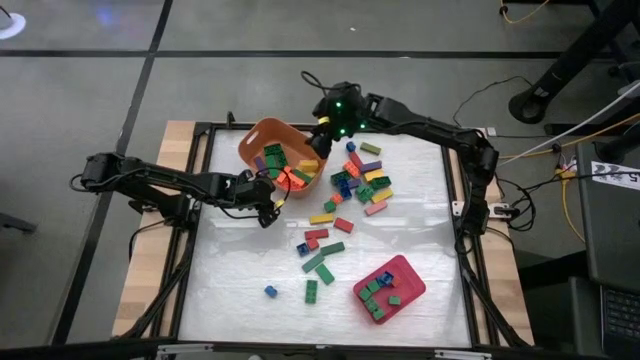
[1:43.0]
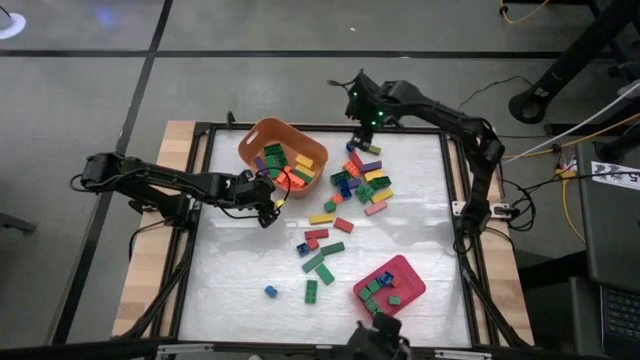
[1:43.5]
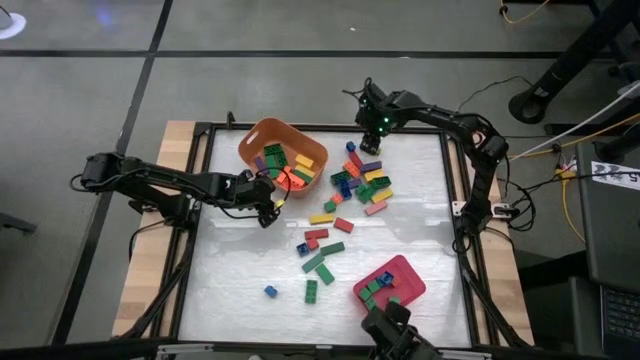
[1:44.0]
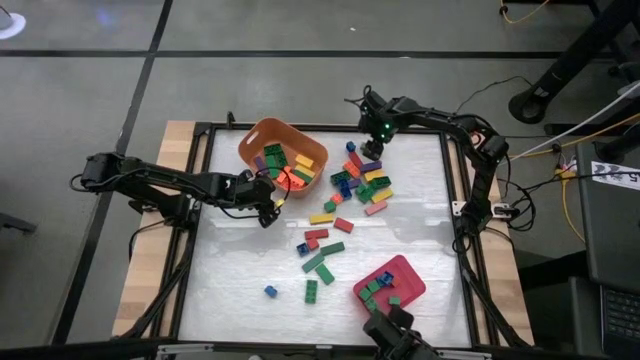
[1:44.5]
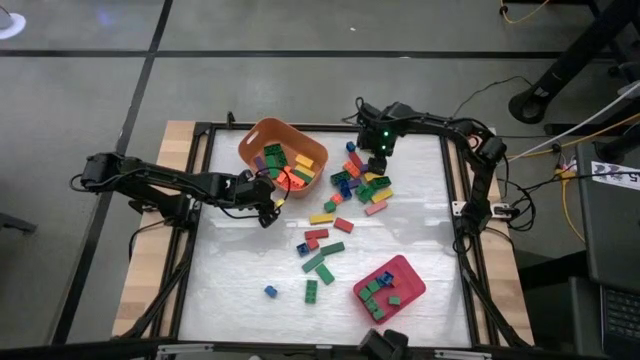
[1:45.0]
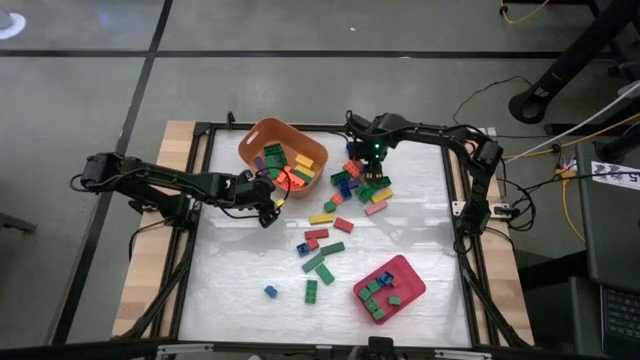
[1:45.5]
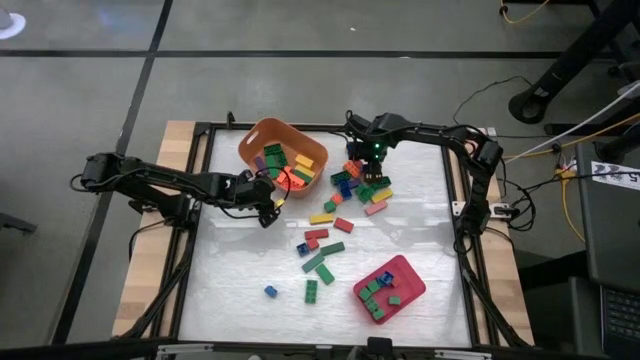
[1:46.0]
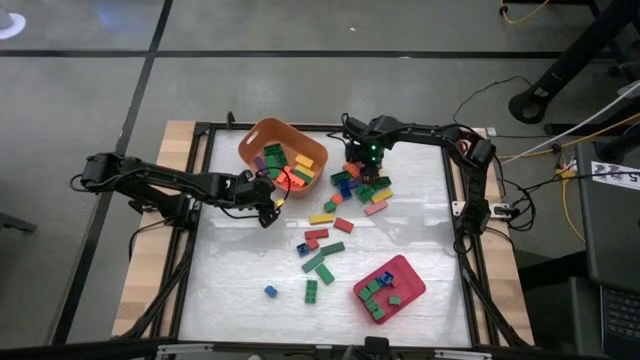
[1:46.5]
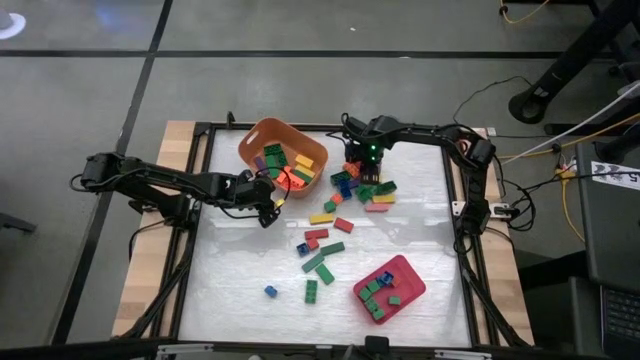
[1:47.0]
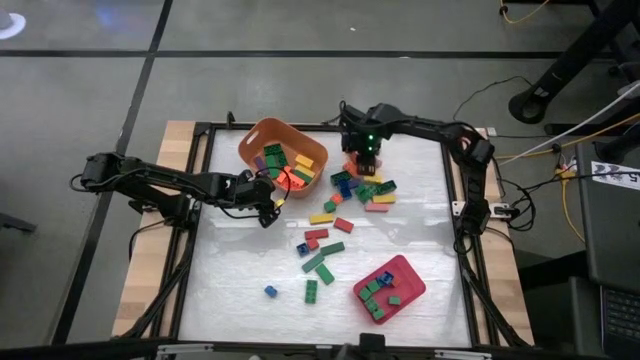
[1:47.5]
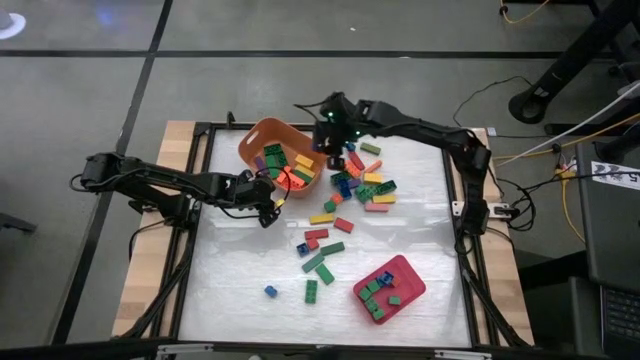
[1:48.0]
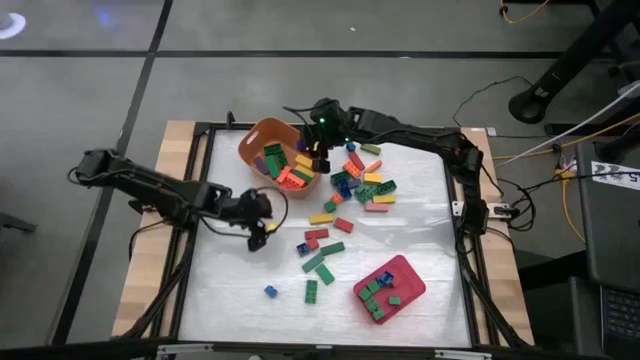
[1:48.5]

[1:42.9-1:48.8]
Task: Sort blocks by size
Put the large dark blue block into the orange bin

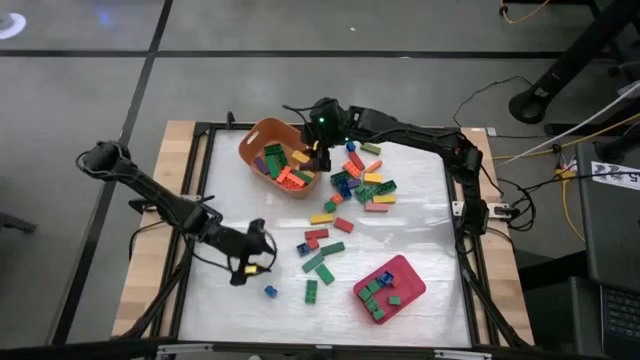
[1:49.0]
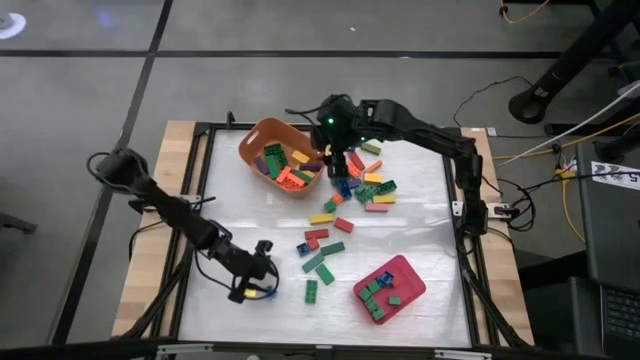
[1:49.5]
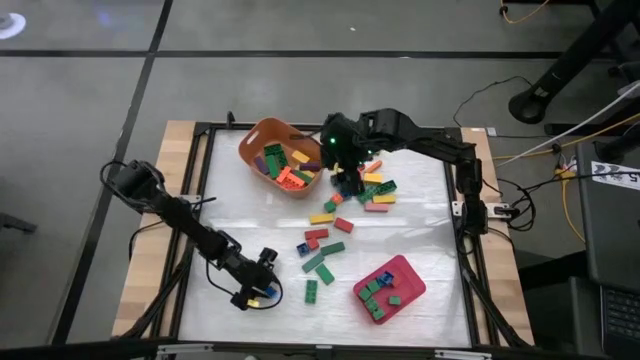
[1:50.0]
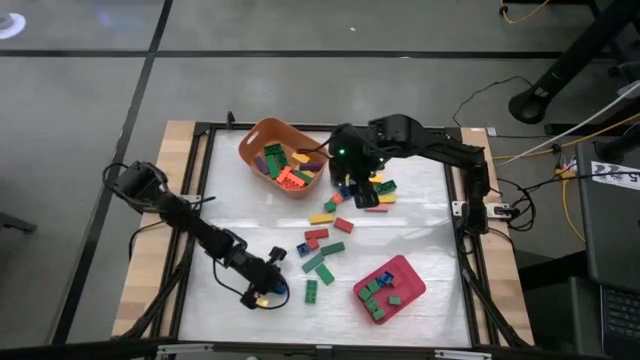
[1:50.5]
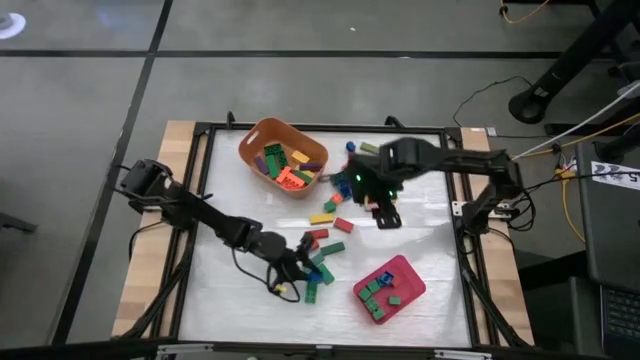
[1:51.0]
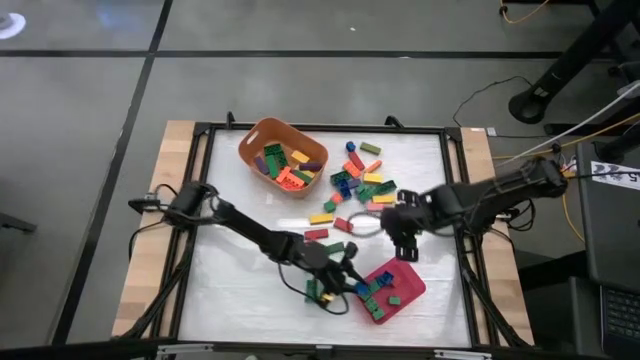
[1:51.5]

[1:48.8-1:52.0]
Put the small blue game piece into the red bin

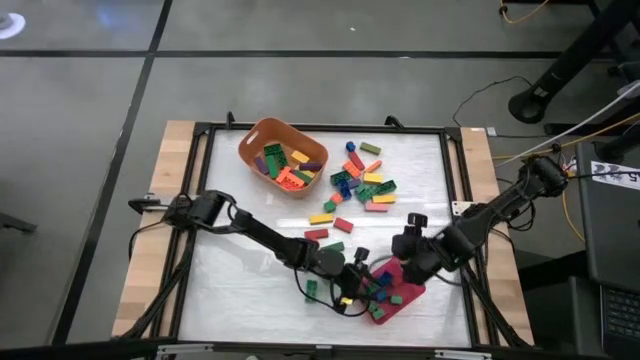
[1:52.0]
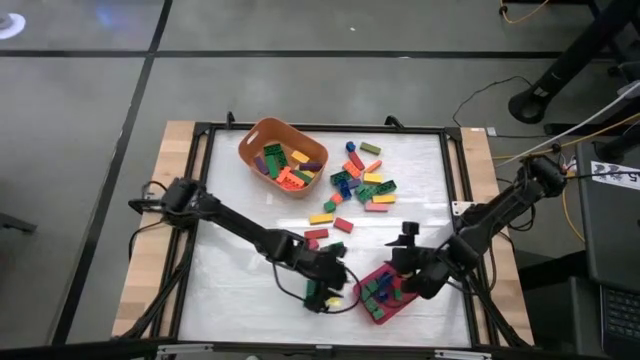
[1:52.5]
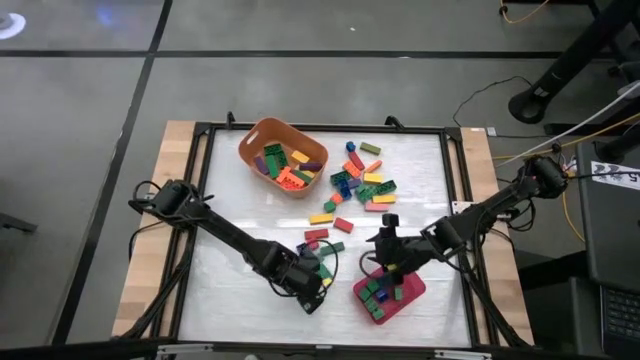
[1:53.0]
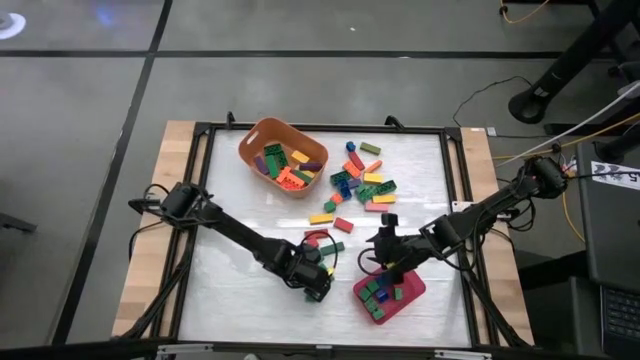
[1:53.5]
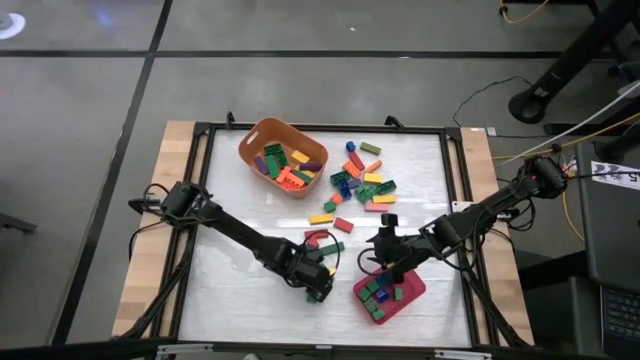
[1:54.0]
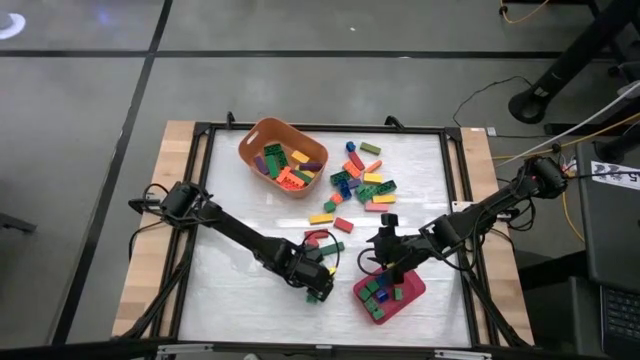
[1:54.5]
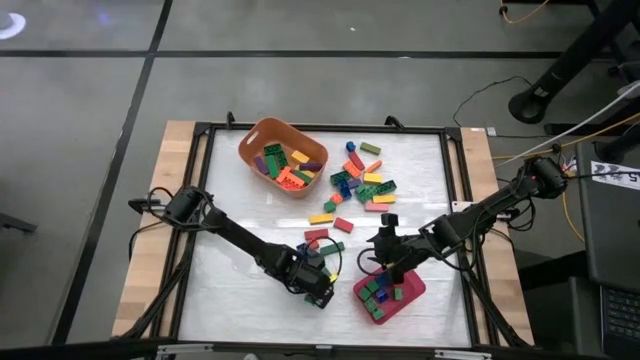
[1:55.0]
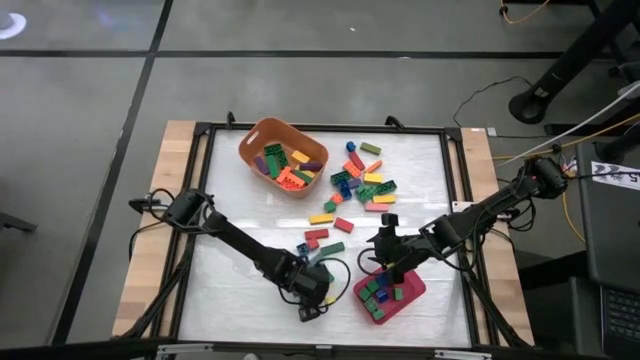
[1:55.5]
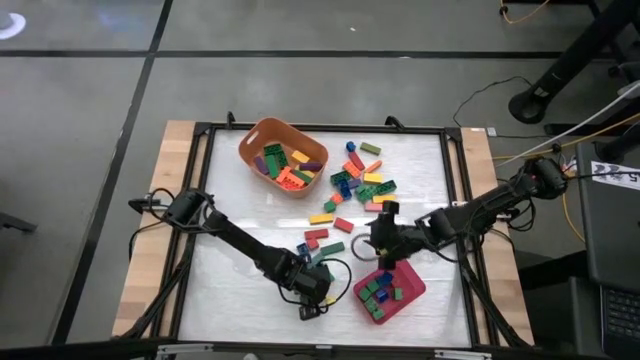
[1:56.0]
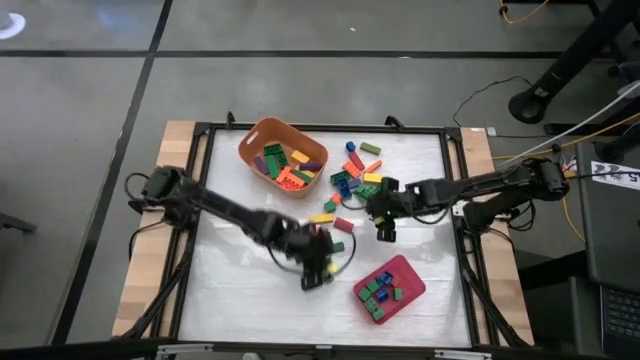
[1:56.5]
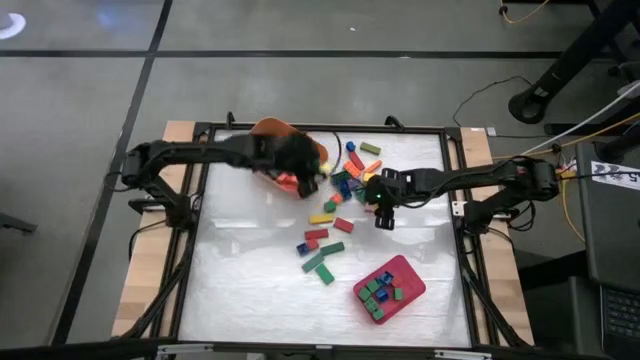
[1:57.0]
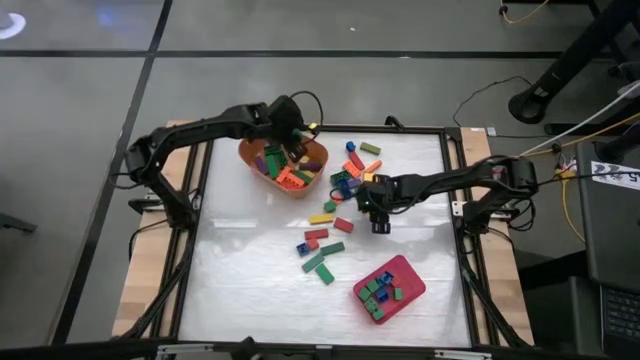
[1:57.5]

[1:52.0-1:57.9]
Put the large green game piece into the orange bin

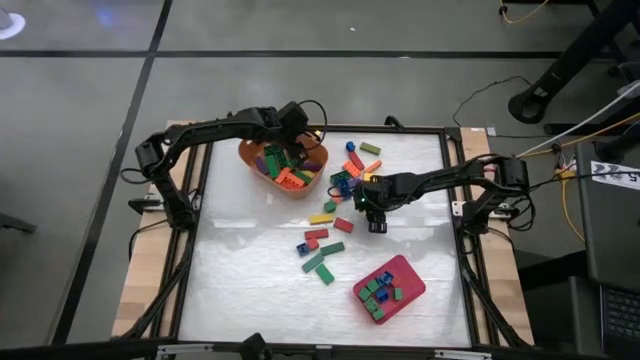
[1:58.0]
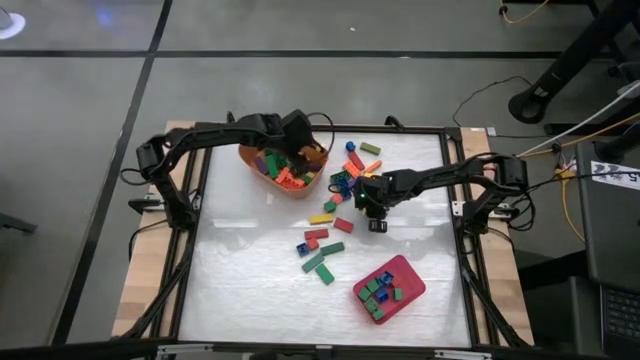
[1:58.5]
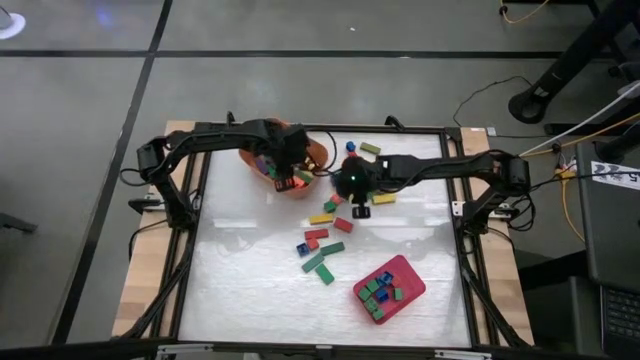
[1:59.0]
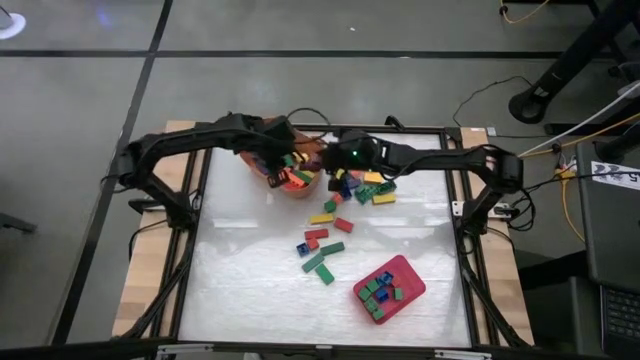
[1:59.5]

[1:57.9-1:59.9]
Put the large pink block into the orange bin

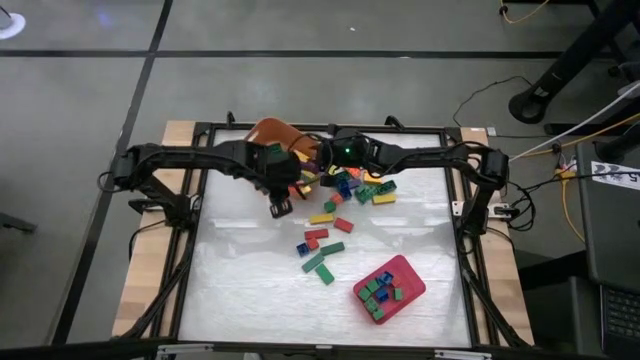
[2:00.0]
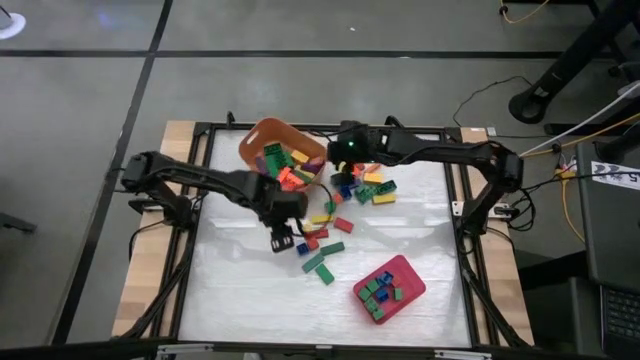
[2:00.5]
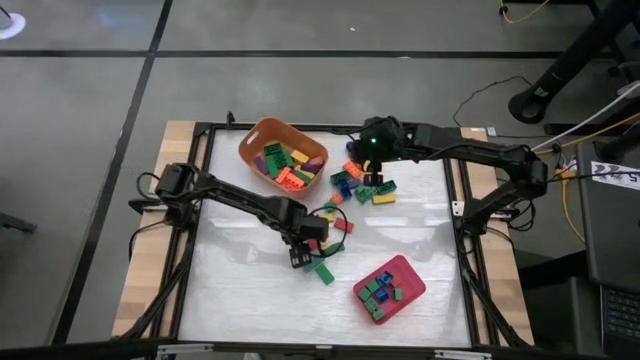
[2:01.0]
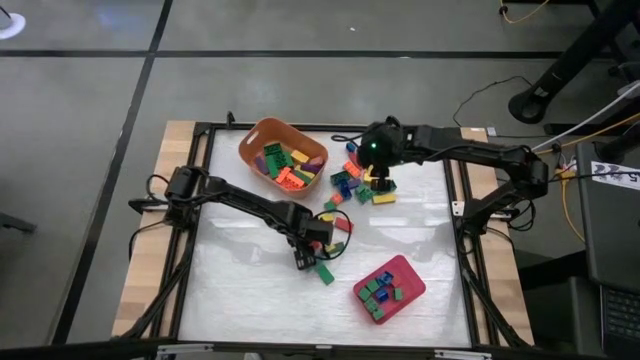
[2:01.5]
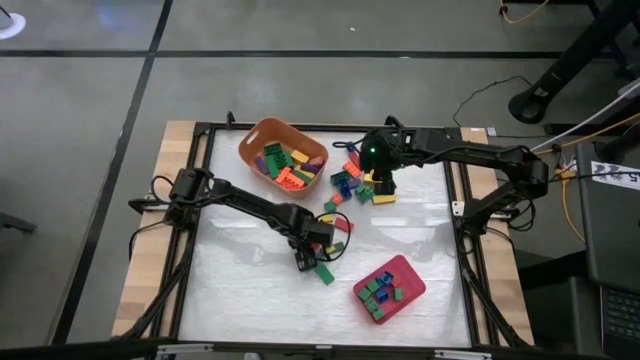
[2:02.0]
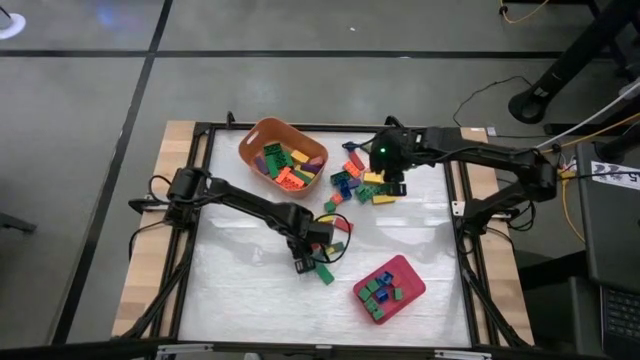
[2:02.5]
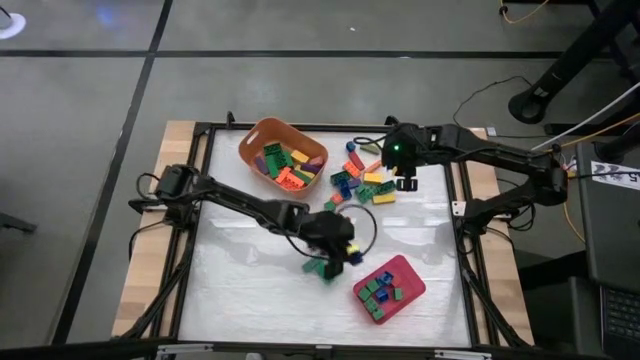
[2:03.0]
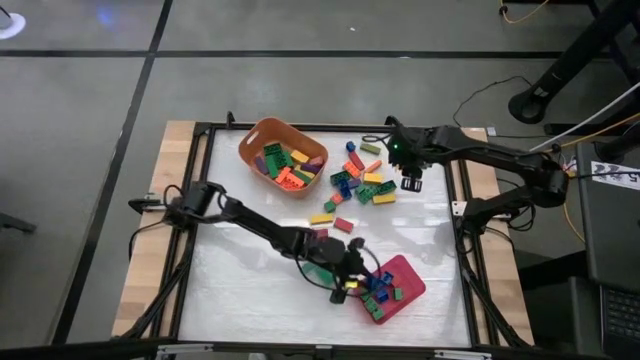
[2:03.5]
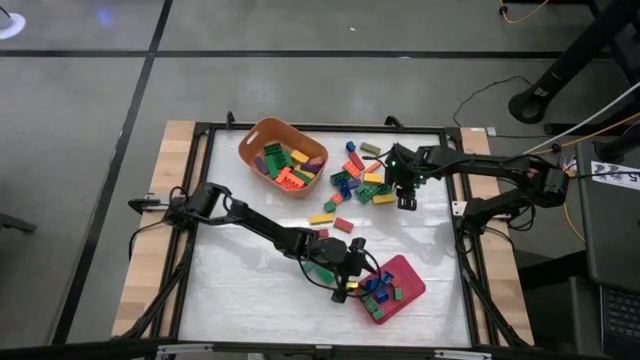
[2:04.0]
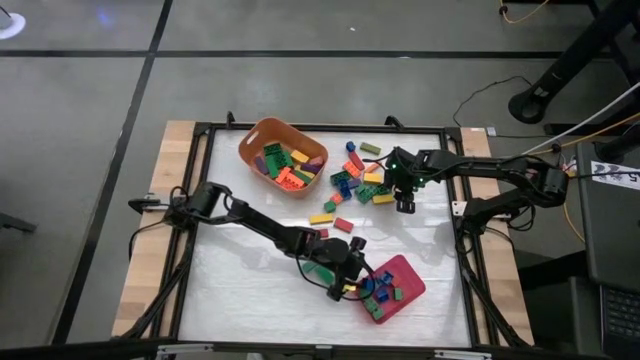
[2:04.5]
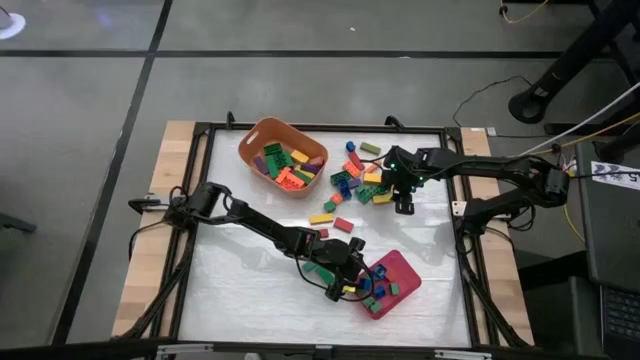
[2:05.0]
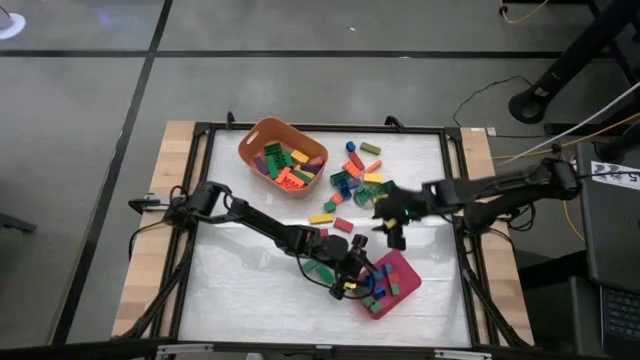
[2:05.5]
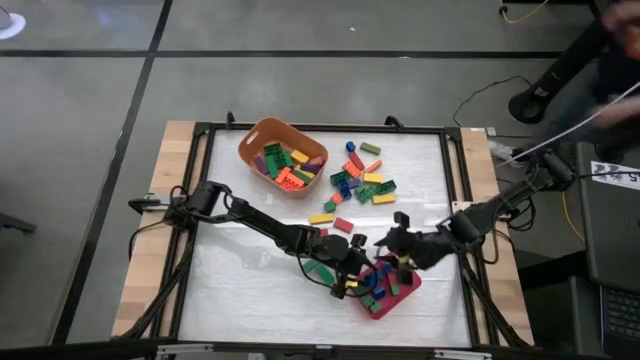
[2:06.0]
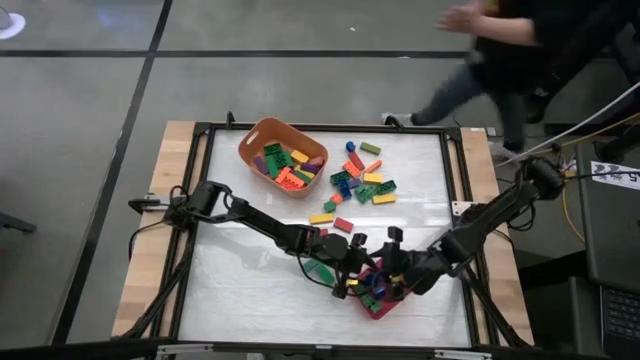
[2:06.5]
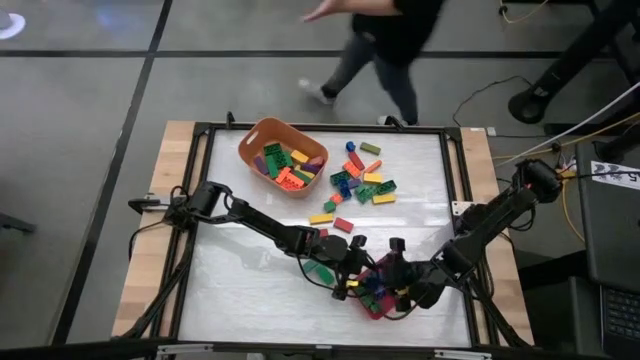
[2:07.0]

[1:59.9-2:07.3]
Put the small blue game piece into the red bin
